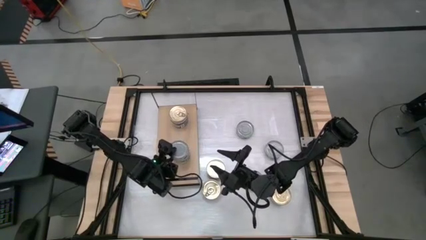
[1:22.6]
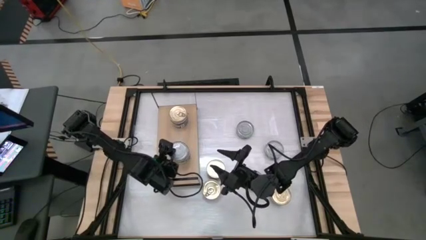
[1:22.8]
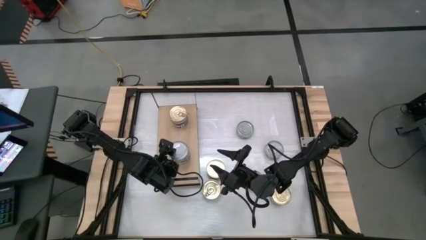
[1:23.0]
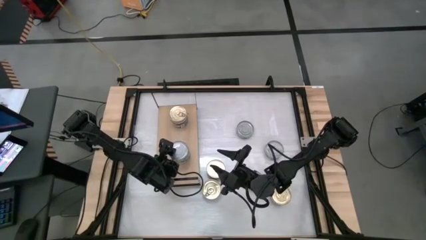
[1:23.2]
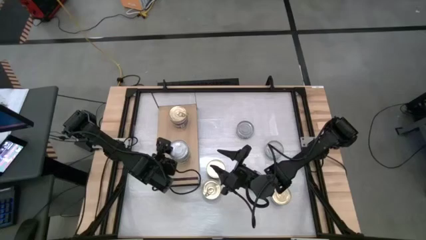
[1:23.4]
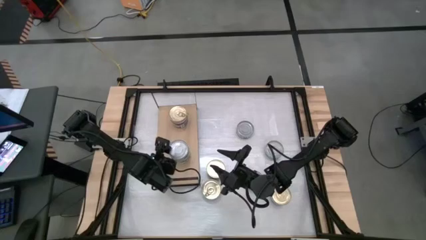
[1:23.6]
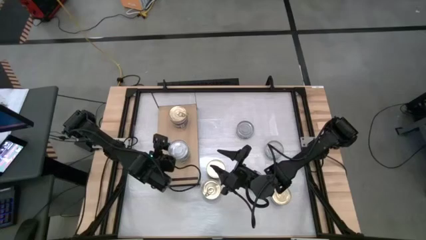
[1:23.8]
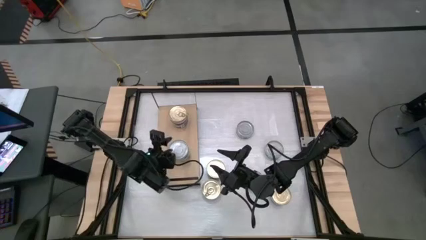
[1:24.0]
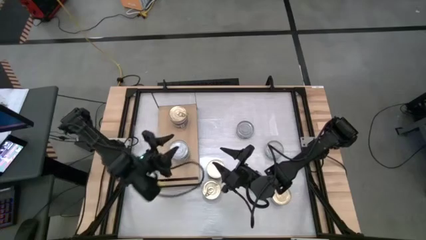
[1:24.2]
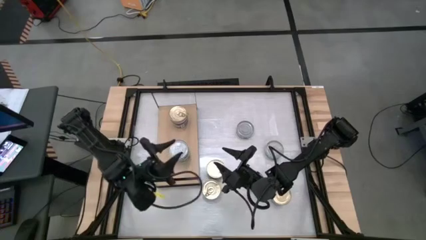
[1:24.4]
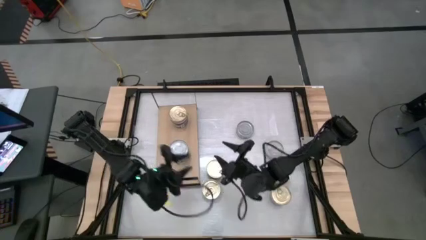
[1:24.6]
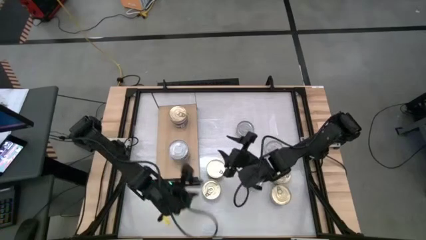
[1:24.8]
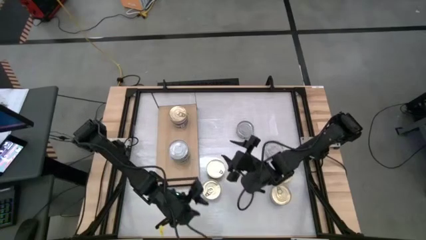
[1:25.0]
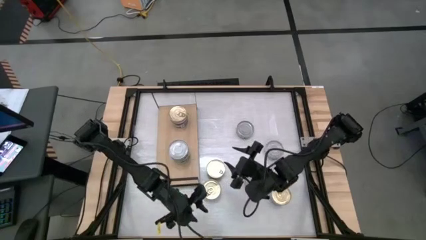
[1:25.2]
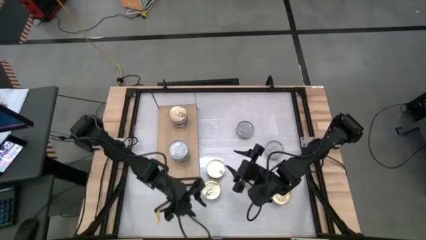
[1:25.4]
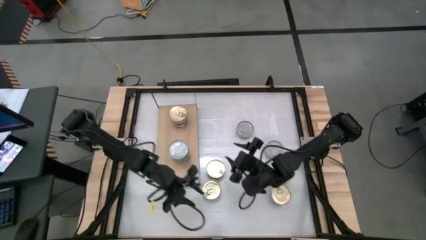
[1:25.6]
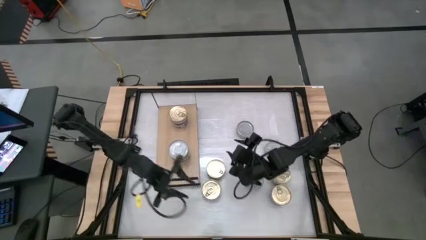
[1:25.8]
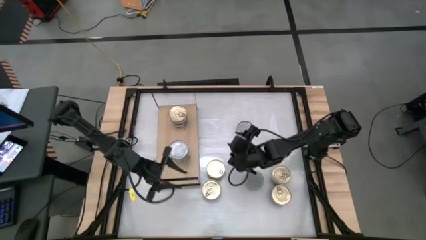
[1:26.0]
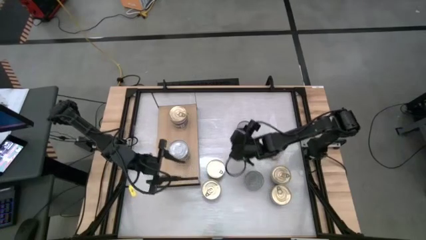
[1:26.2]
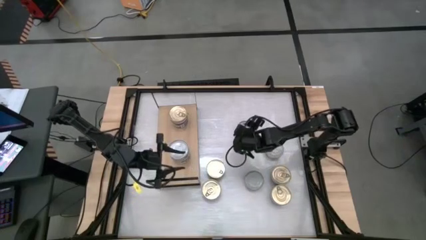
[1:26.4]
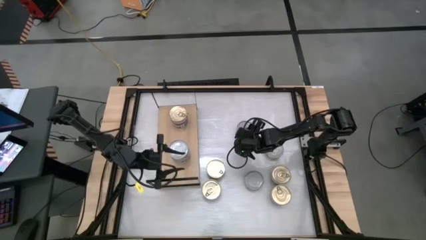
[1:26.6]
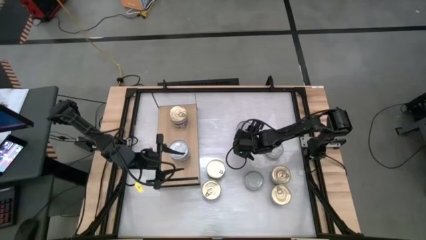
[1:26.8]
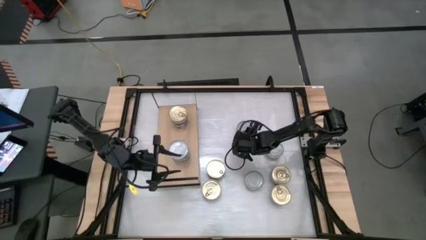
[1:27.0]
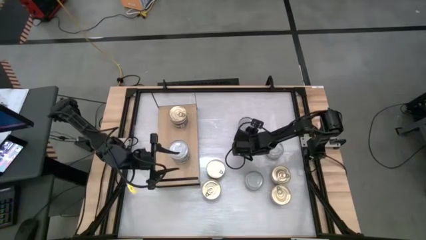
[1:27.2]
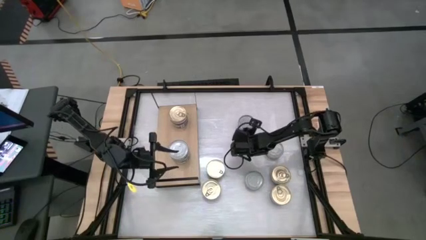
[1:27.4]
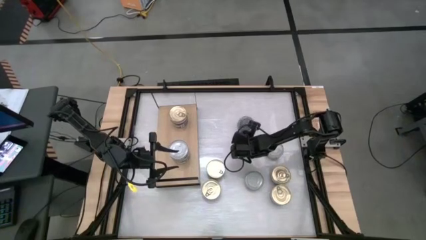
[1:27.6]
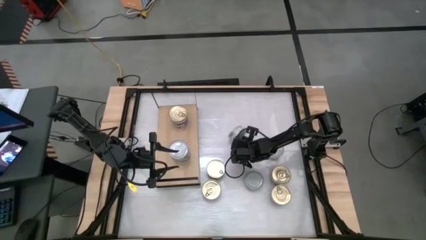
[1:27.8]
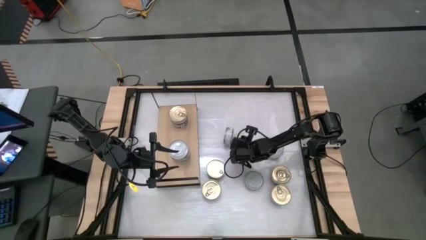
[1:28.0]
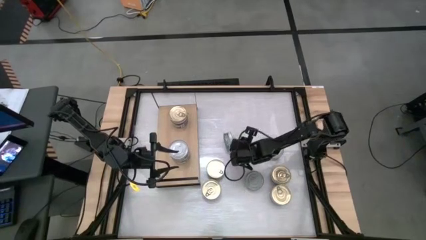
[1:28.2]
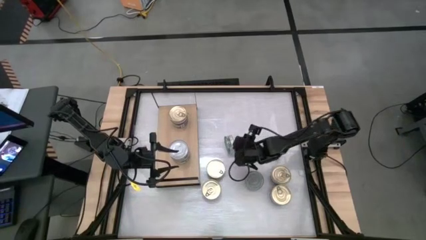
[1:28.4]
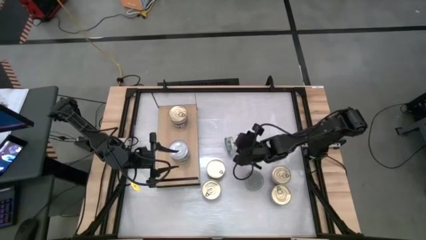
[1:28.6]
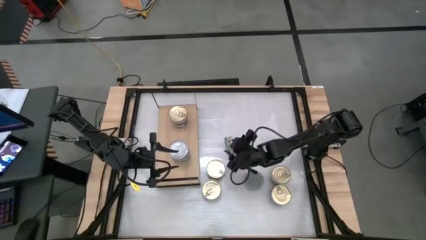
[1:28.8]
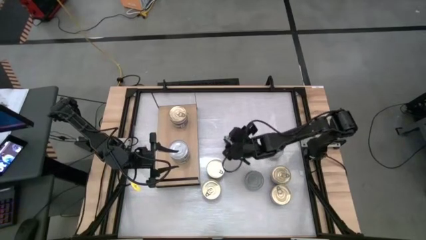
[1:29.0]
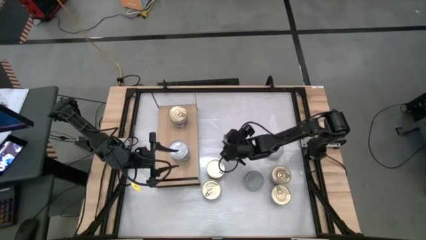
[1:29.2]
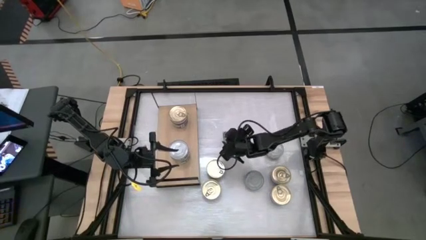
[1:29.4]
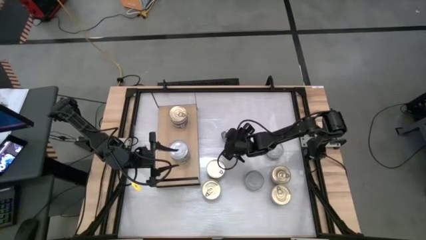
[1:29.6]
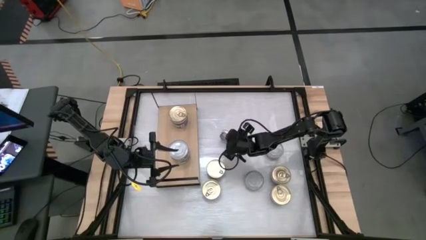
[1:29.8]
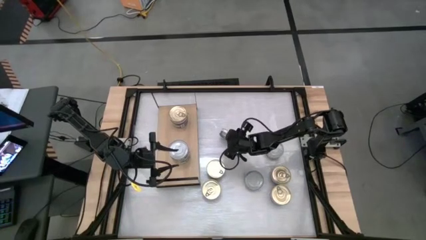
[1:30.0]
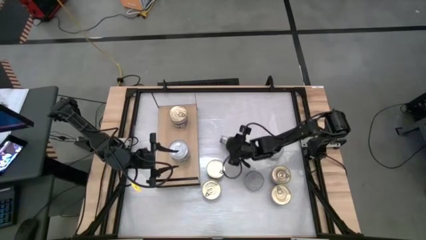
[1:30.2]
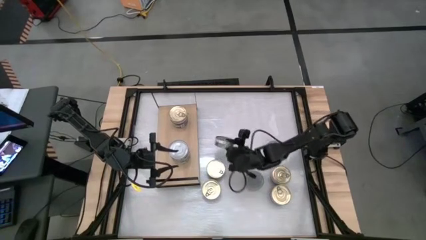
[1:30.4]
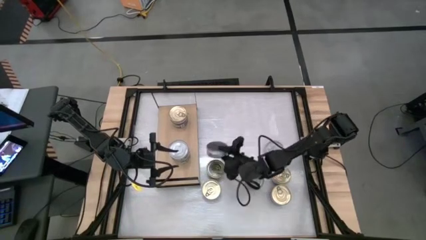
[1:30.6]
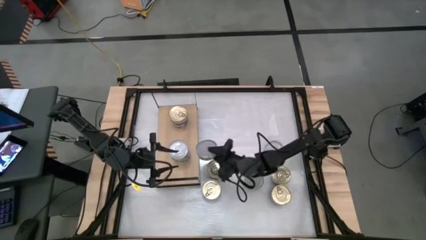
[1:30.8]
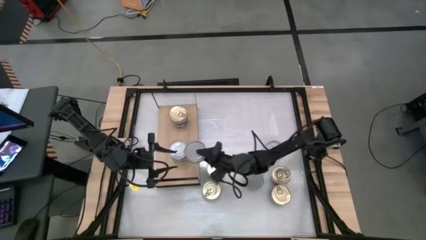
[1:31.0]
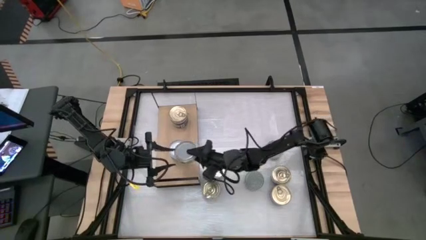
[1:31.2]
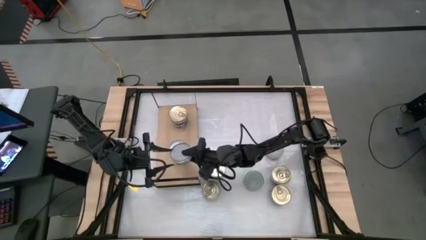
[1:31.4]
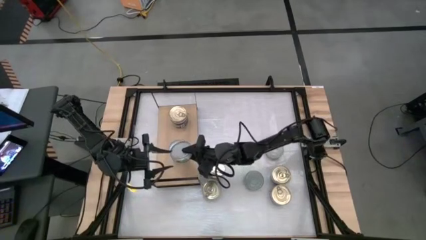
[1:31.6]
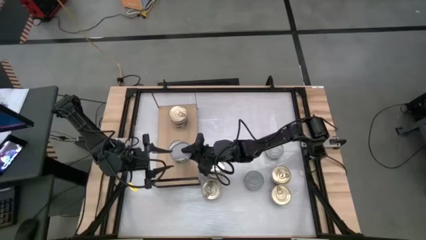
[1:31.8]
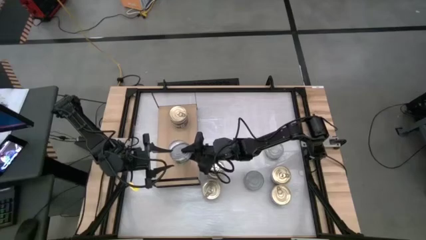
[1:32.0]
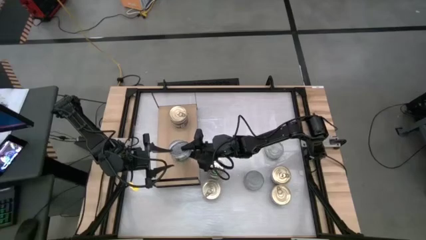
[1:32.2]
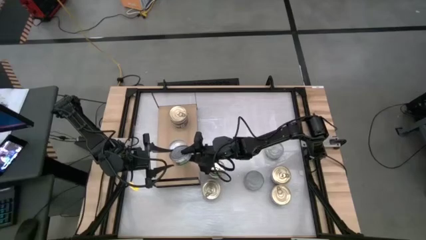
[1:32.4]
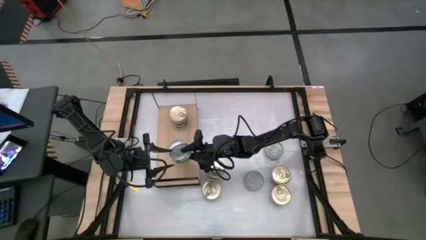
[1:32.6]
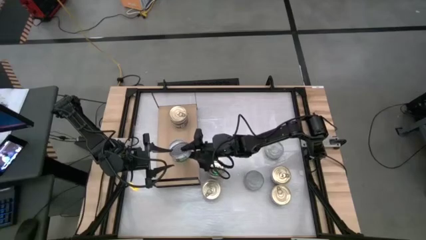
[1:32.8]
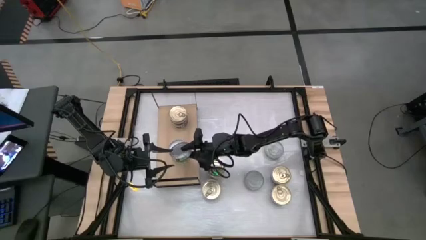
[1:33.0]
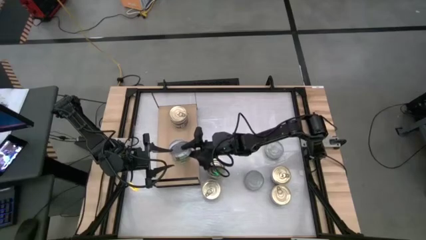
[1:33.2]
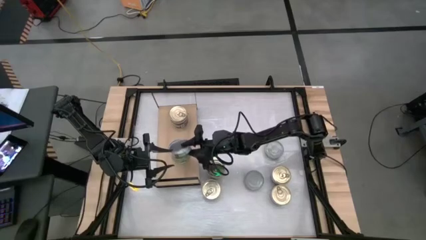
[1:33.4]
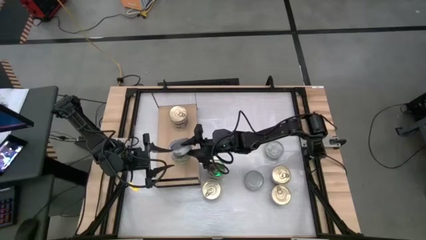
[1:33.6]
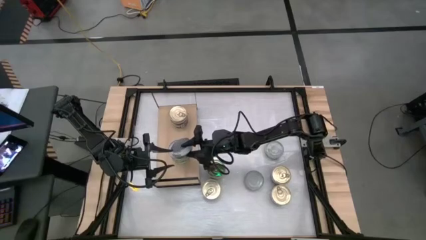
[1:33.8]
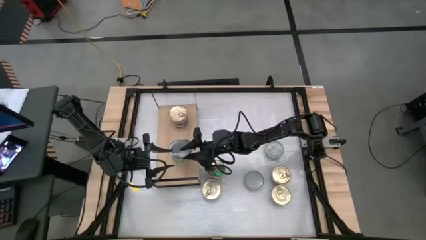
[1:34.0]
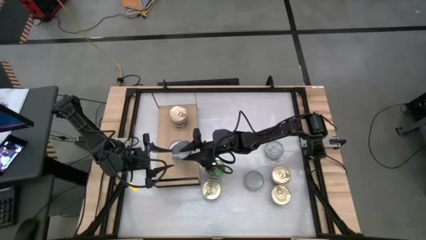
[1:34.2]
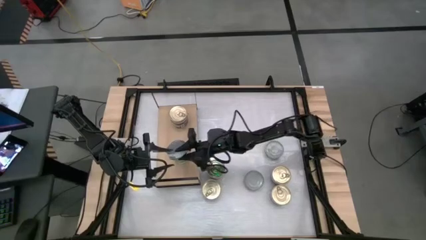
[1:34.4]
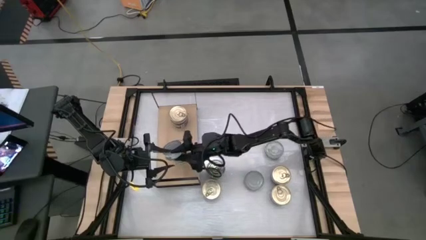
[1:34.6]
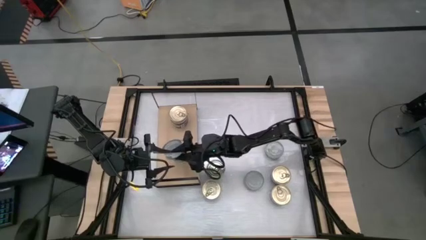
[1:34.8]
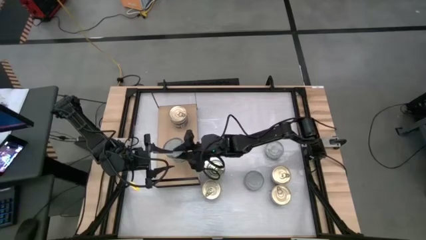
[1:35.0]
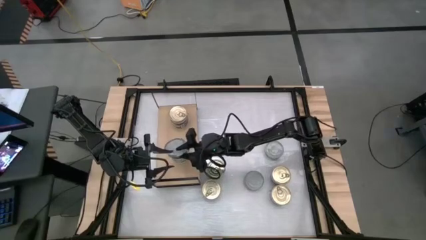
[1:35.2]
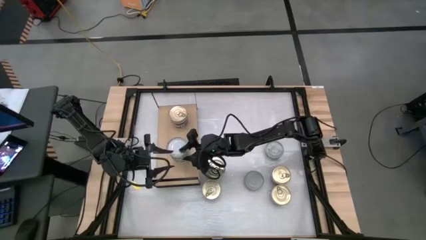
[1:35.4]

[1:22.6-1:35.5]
Task: Stack canned seafood by type on shelf
Stack the green tuna can on top of the other green tuna can on the shelf

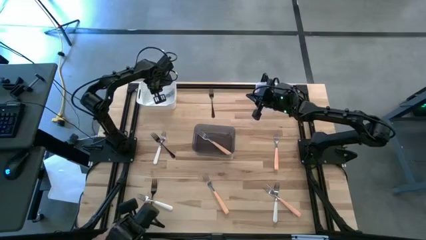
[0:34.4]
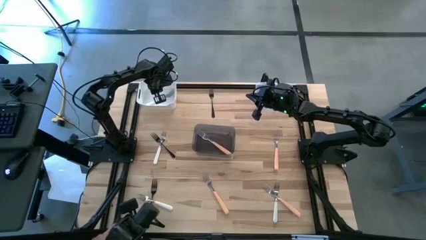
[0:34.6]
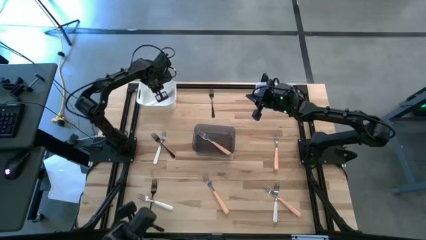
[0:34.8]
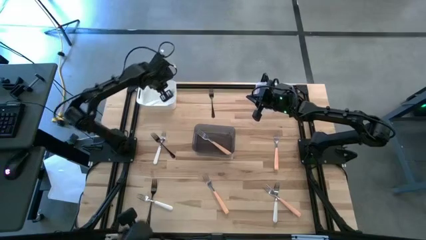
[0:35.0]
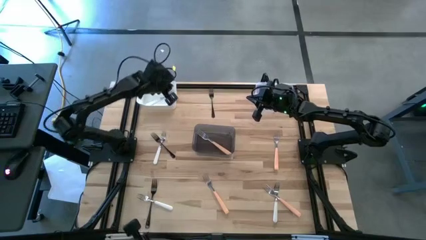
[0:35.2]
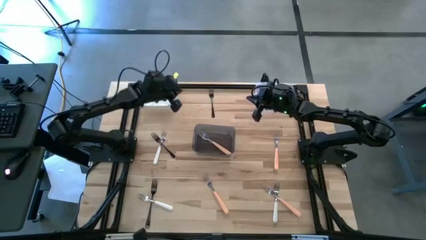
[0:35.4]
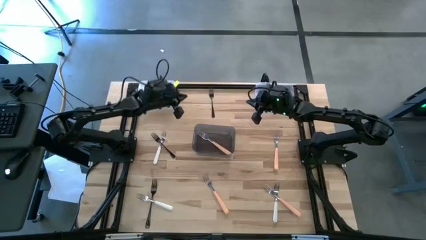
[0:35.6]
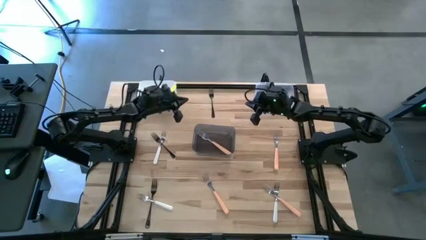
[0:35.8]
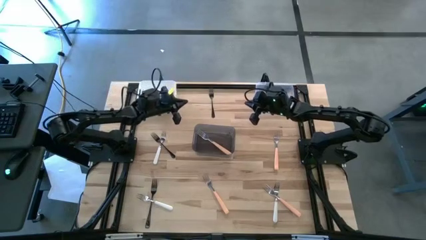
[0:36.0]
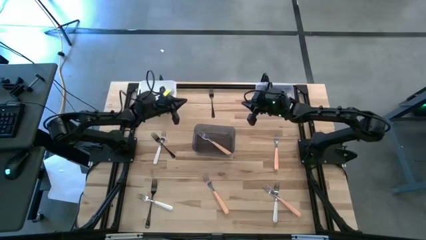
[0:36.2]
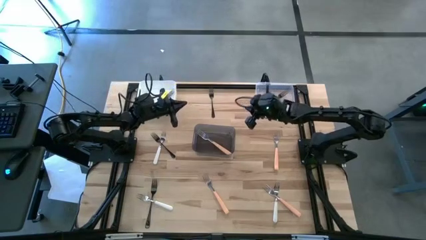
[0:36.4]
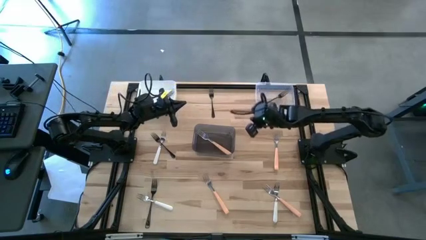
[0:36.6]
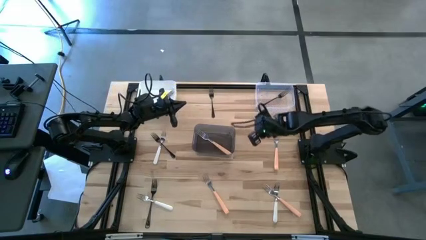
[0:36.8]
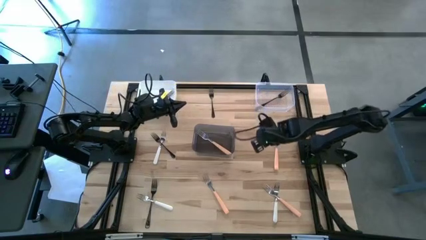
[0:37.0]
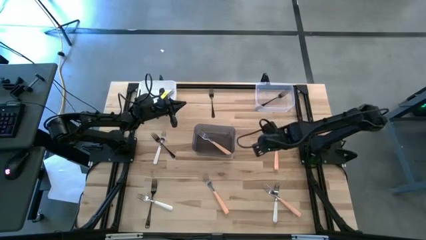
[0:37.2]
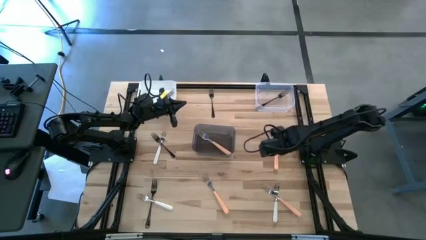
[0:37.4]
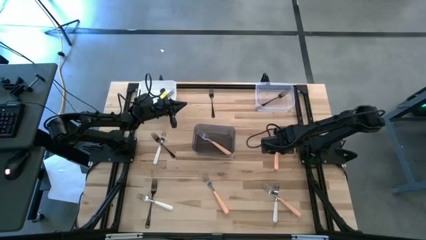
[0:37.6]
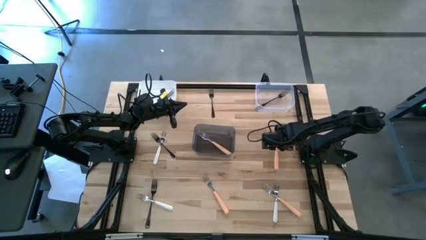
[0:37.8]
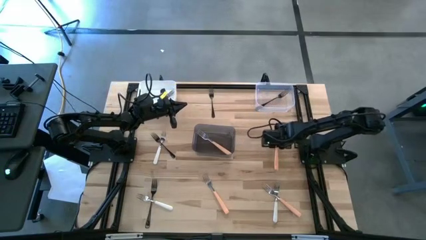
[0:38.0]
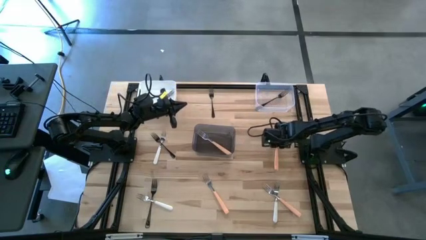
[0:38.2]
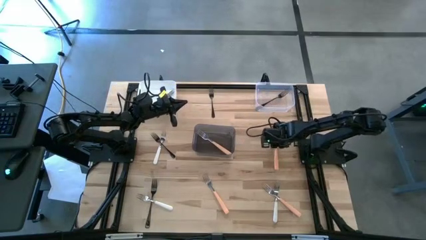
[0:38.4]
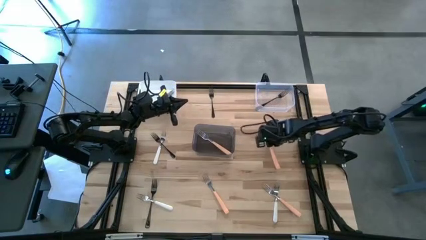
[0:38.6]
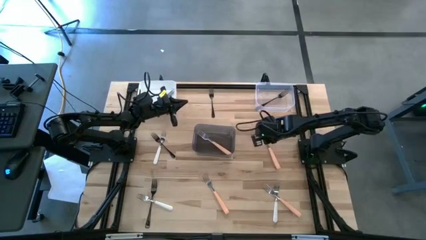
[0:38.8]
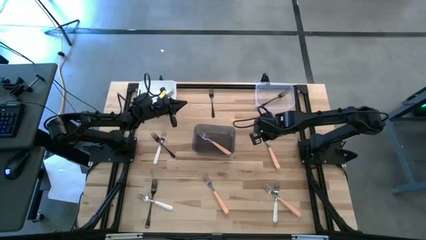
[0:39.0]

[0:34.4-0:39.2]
Task: Sort silverware by color (type)
Put the top orange fork into the black bin
